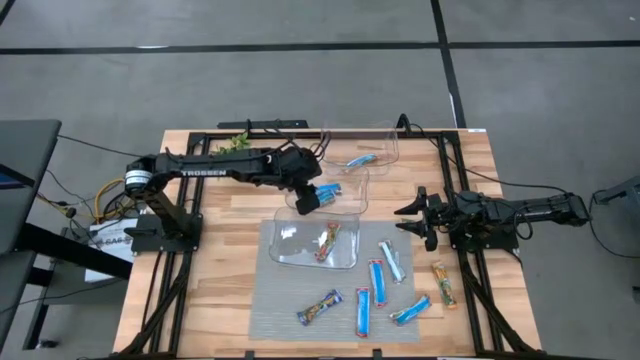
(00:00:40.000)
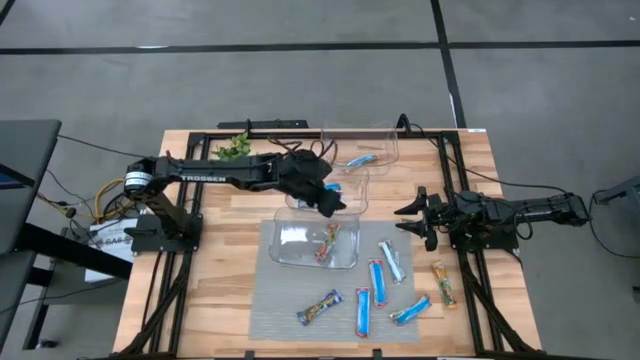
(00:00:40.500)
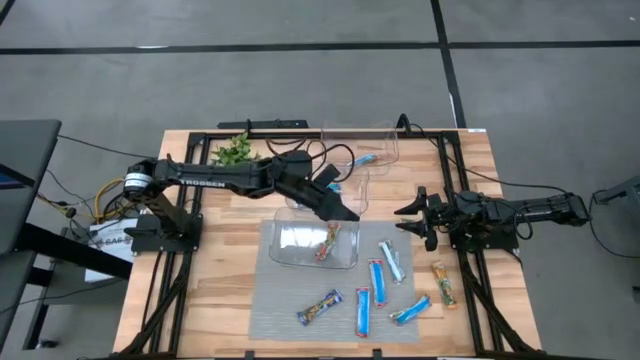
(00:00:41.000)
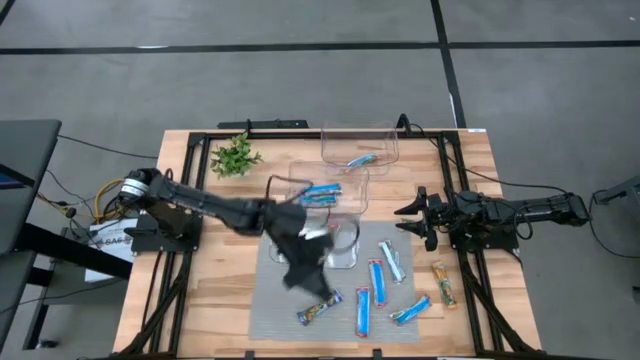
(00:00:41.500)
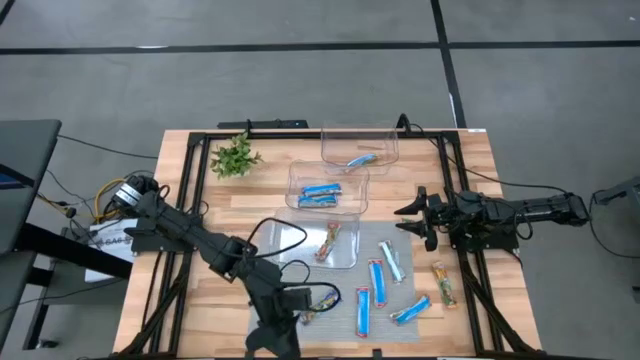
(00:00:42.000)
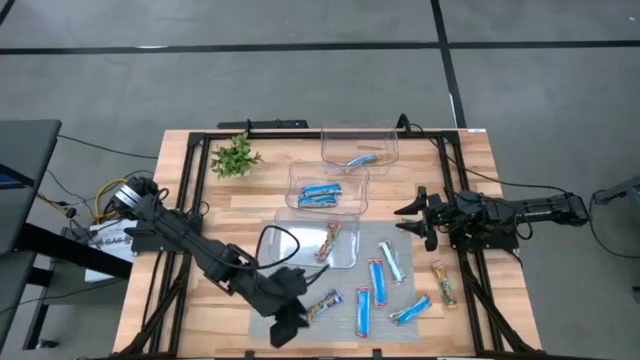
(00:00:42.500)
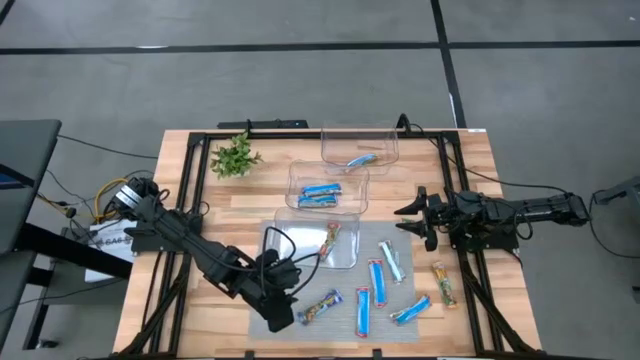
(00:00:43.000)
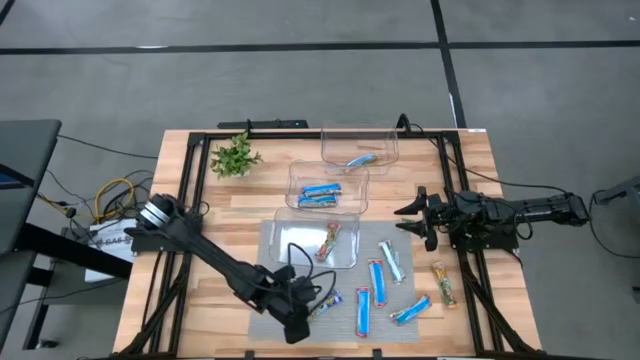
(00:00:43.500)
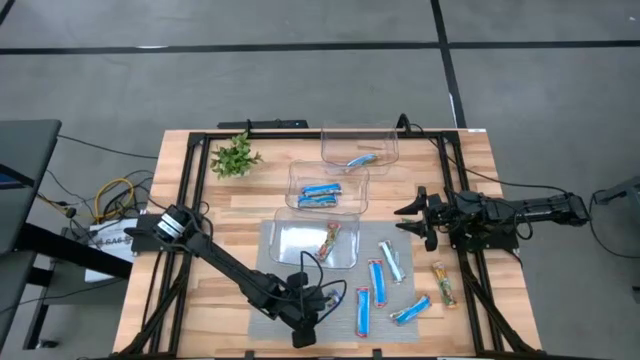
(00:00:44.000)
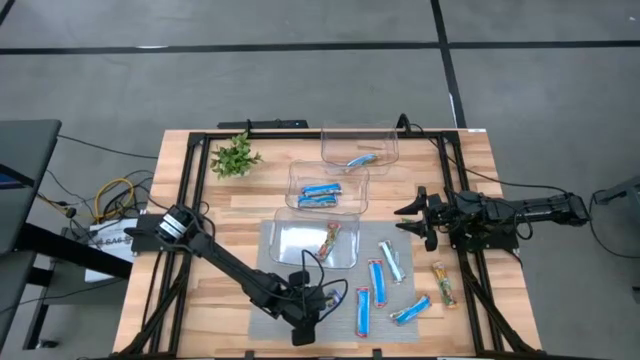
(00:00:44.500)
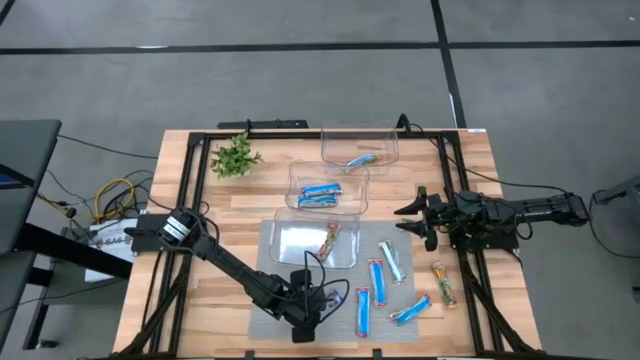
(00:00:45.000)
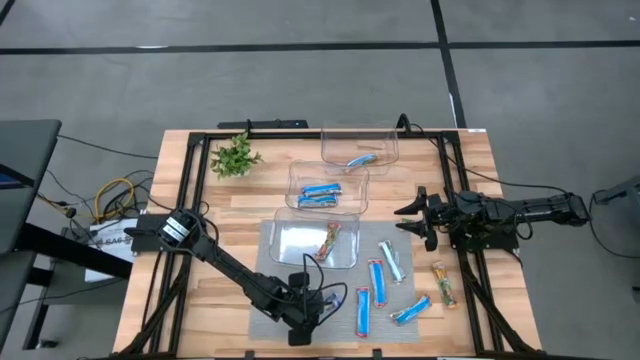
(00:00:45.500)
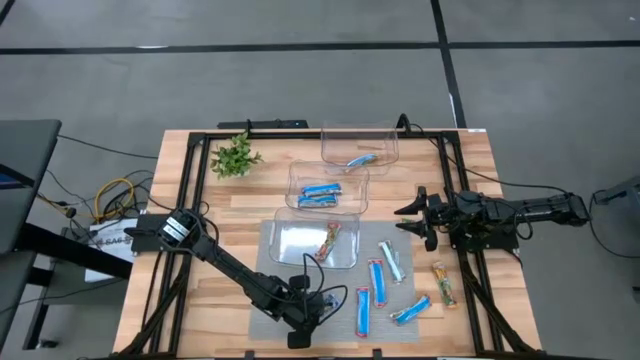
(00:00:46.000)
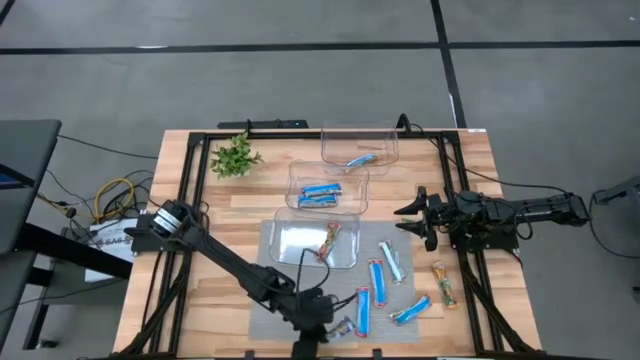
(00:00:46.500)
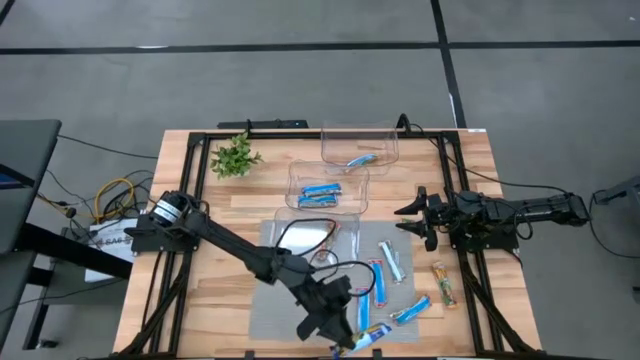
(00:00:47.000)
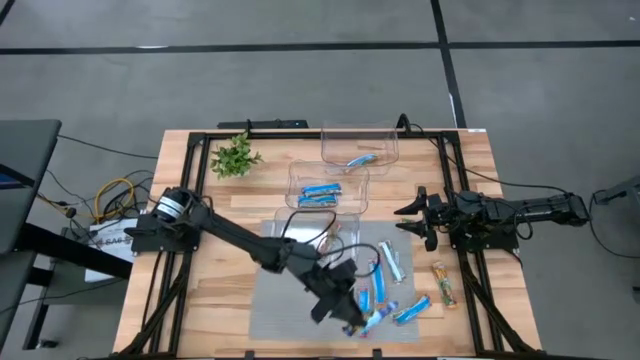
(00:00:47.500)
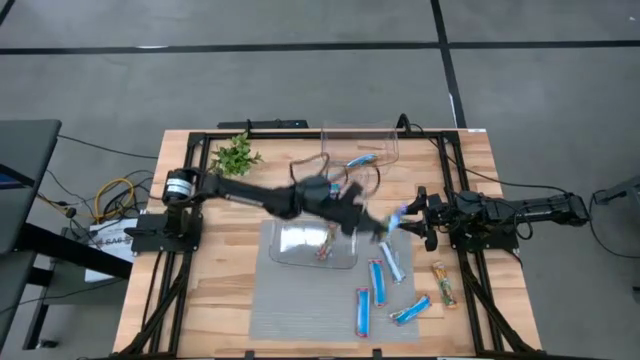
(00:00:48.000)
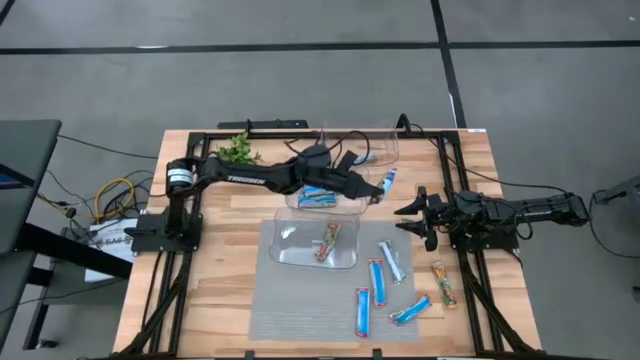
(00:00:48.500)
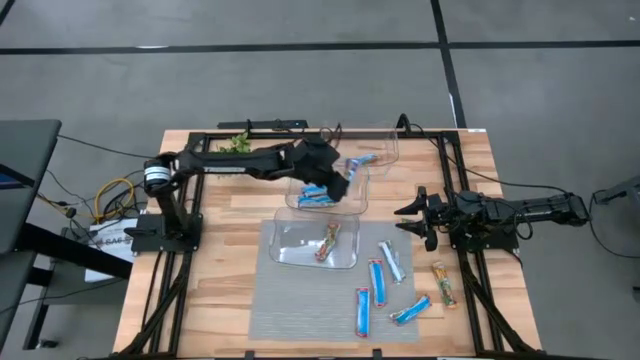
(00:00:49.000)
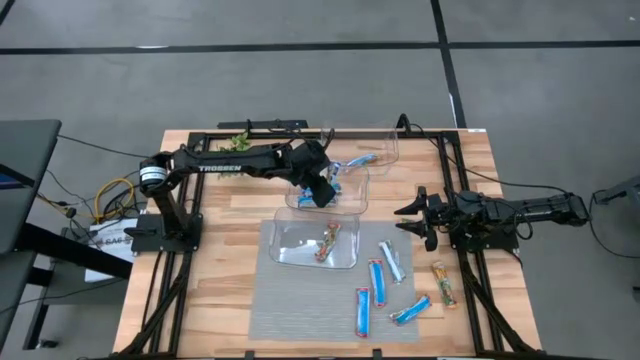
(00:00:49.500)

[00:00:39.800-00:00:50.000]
Task: Pick and place Granola Bars by type
Put the blue granola bar into the middle transparent bin

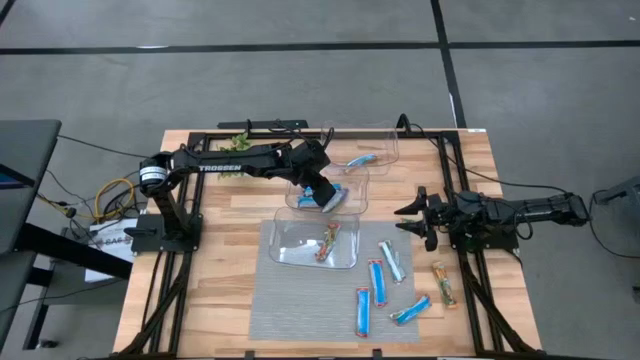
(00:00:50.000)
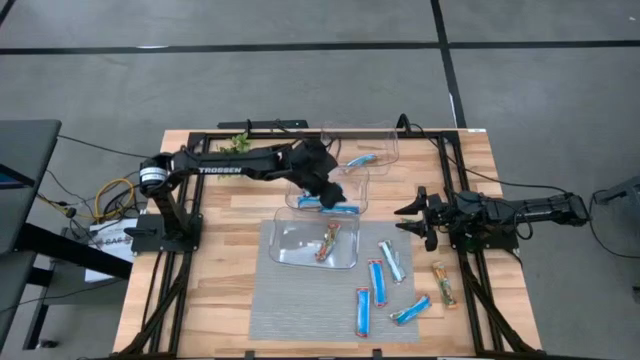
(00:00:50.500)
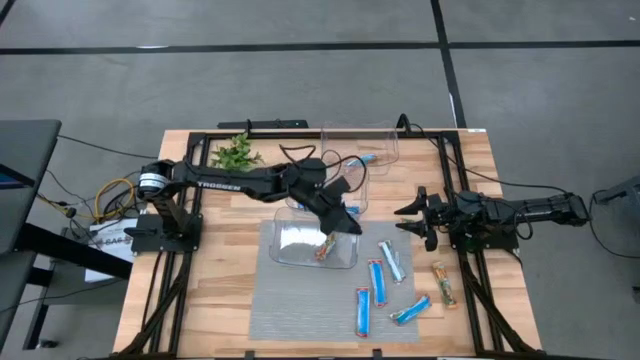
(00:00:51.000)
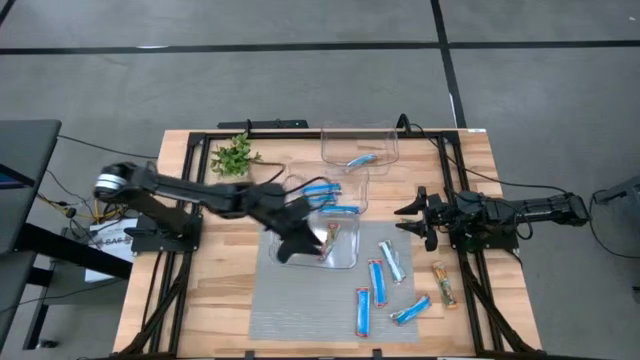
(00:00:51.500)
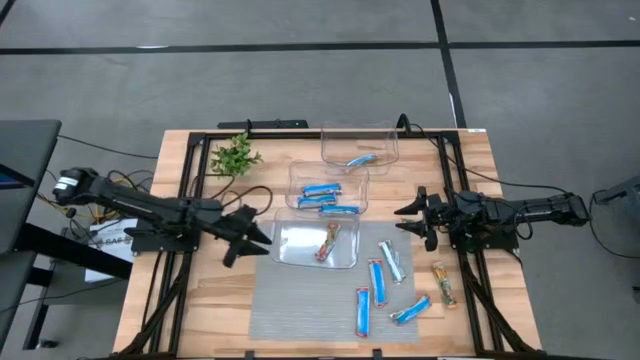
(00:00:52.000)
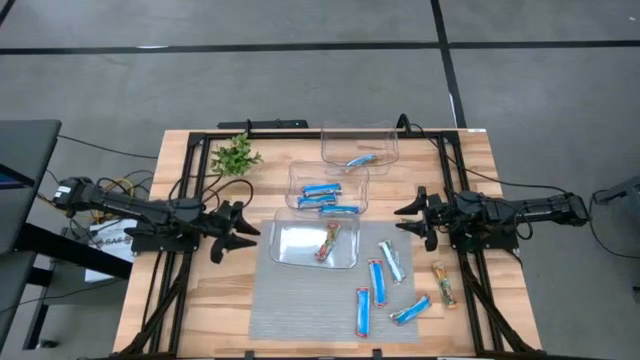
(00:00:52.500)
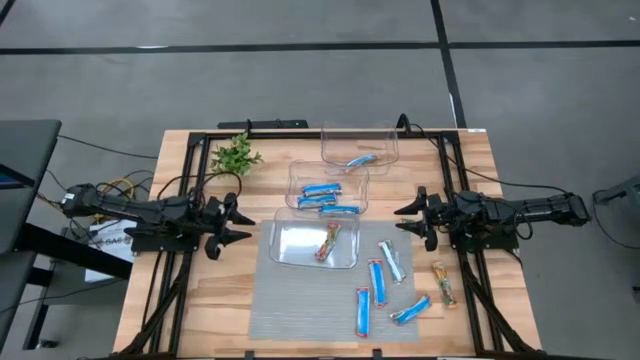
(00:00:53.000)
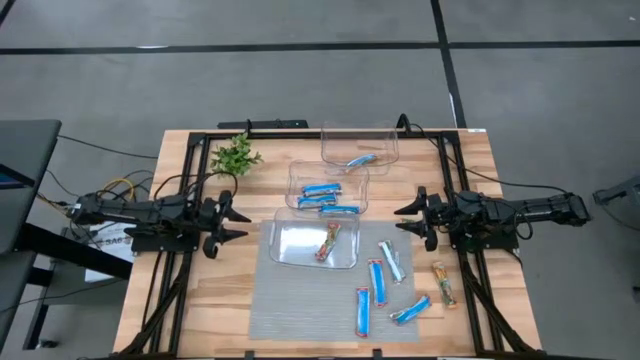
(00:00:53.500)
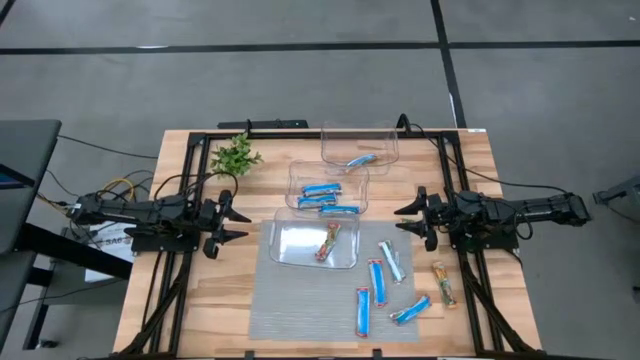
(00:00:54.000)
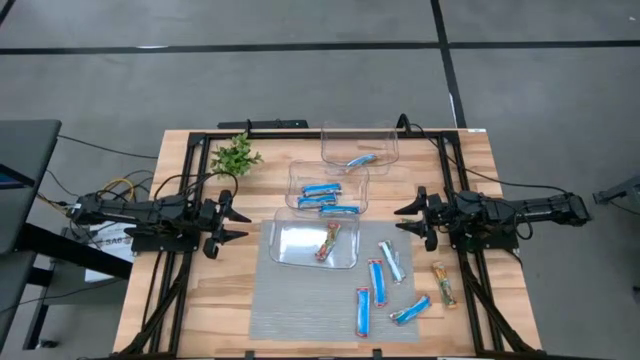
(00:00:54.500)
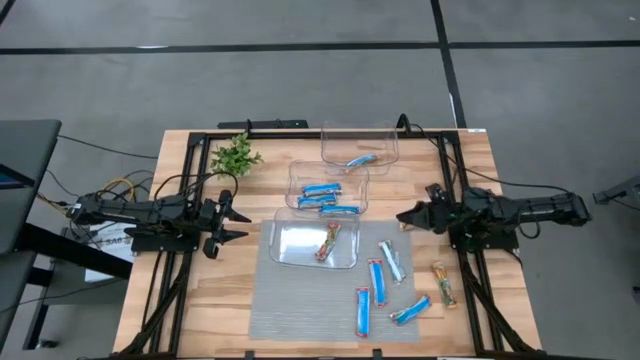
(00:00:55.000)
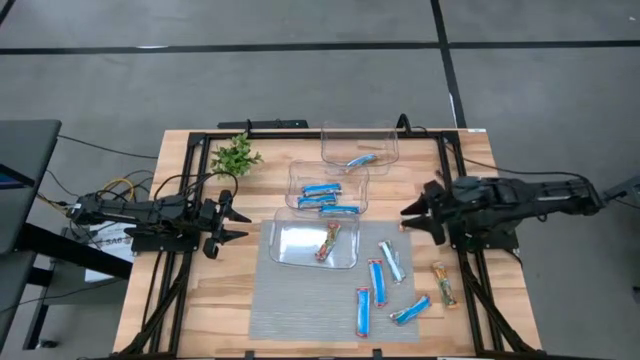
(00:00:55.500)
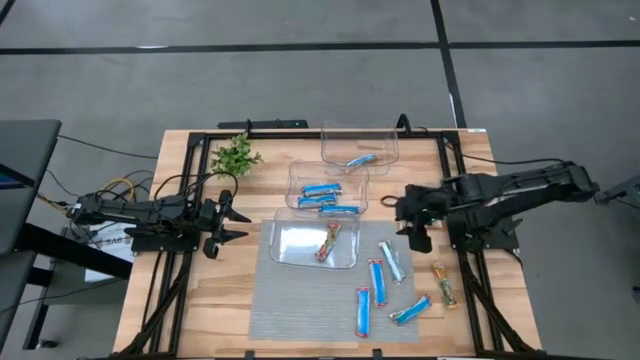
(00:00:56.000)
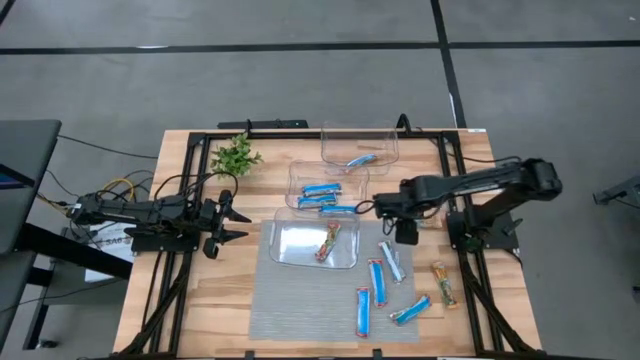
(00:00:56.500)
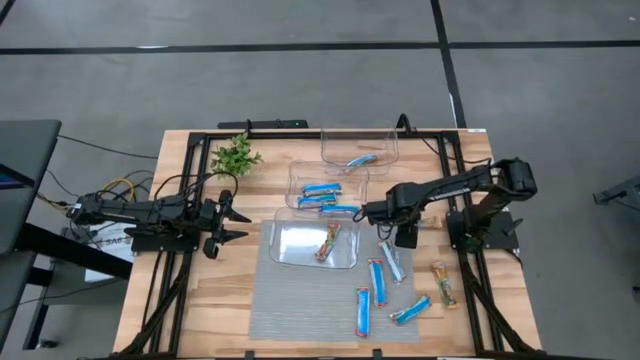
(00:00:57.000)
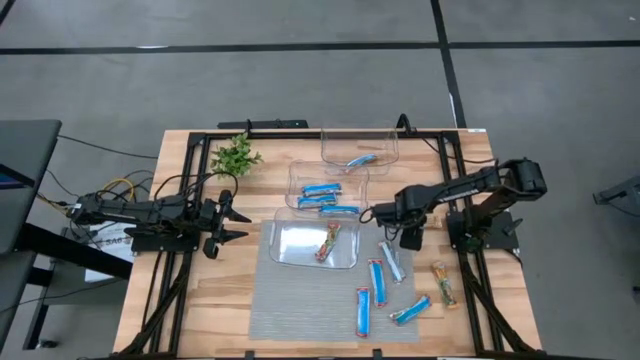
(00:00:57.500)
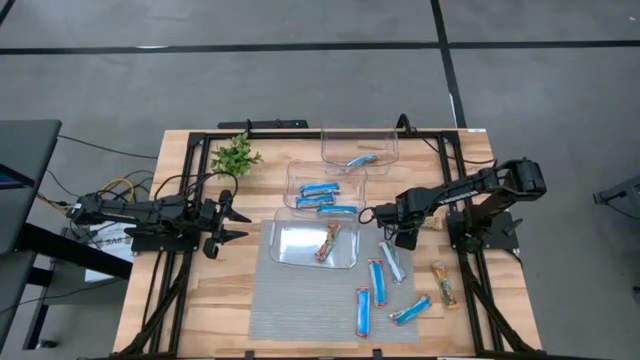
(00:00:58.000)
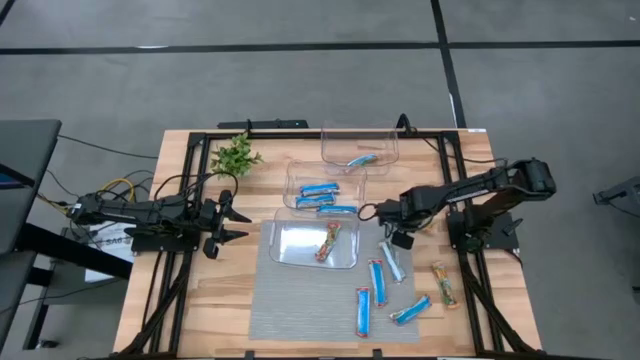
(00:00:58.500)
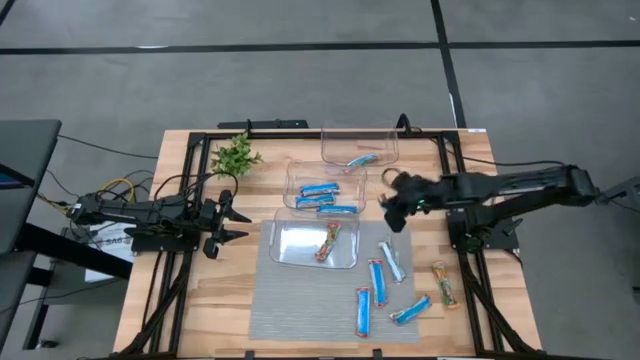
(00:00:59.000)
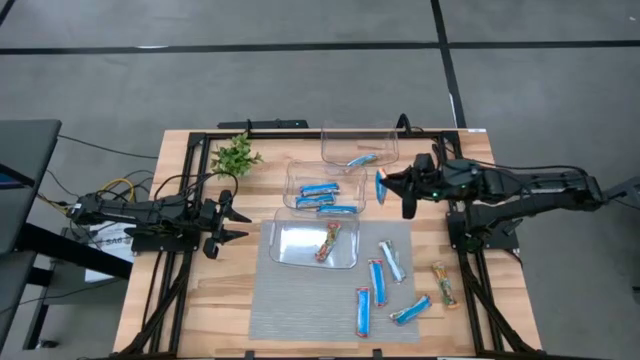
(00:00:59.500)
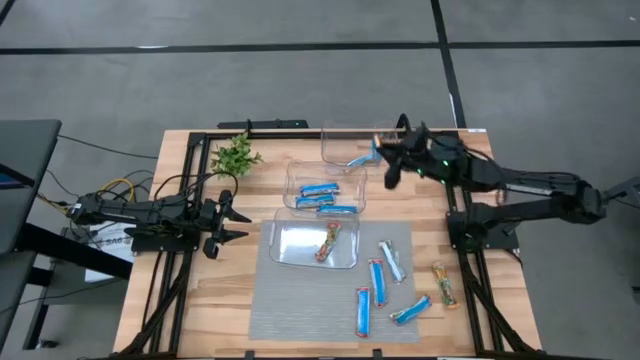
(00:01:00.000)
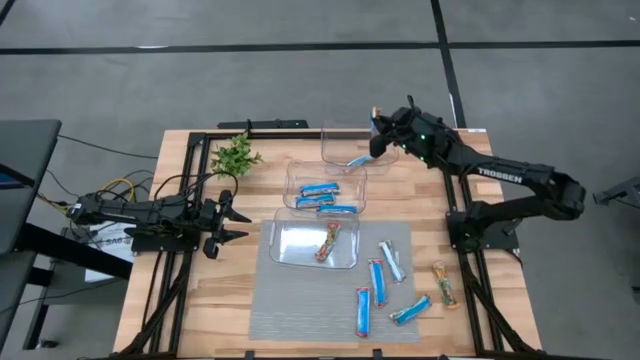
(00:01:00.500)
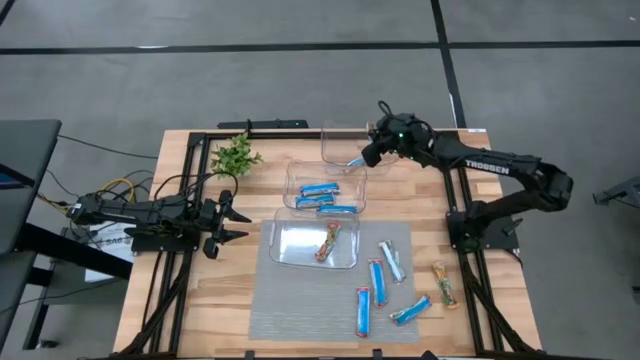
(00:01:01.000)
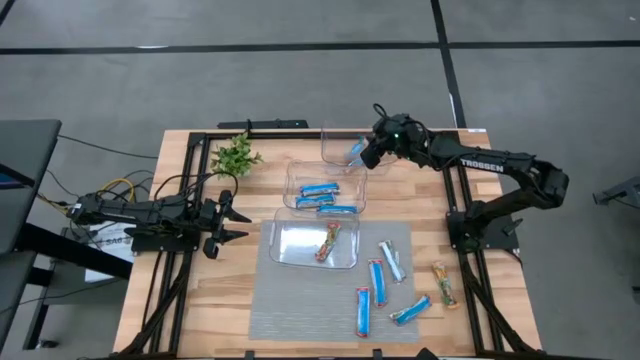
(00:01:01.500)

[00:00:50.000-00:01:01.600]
Put the yellow granola bar into the top transparent bin

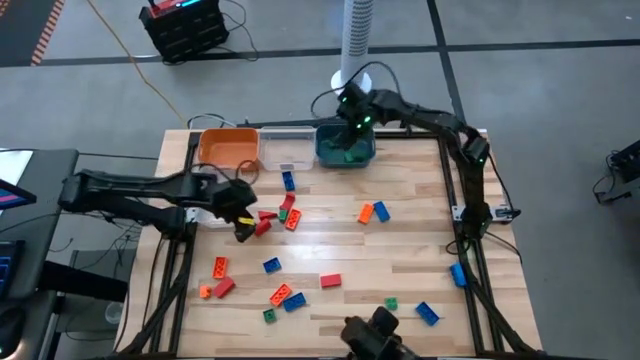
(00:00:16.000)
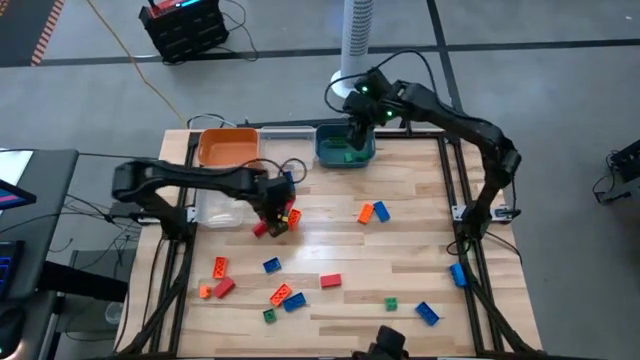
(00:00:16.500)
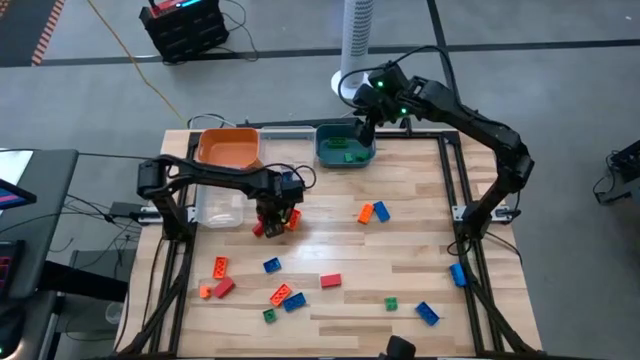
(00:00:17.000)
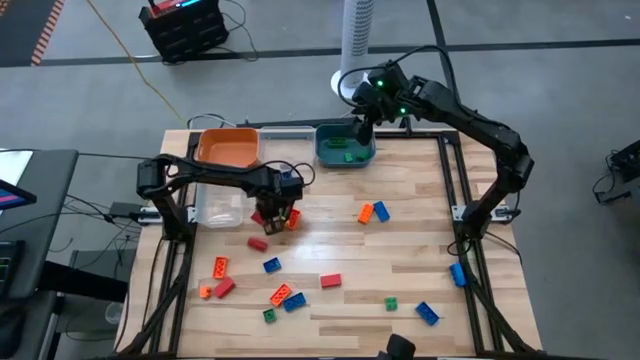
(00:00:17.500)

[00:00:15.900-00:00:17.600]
Task: Sort blocks
Put the red block into the orange bin
